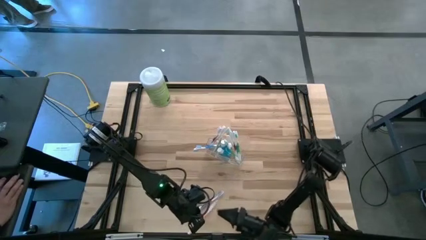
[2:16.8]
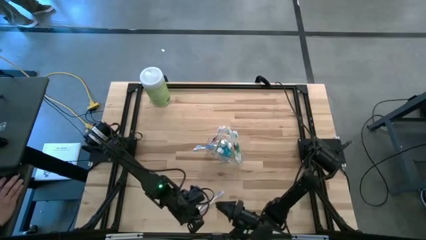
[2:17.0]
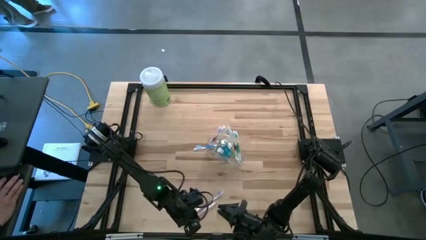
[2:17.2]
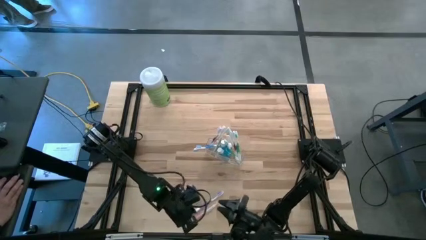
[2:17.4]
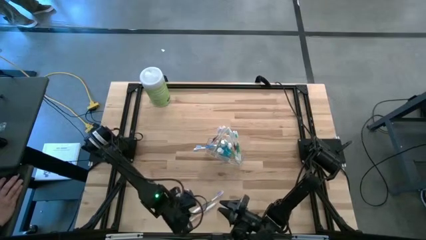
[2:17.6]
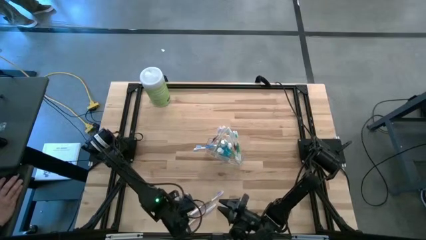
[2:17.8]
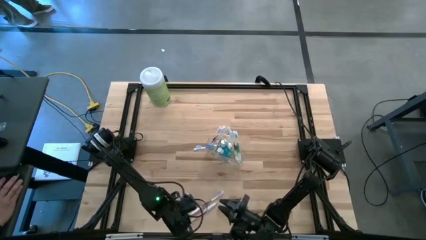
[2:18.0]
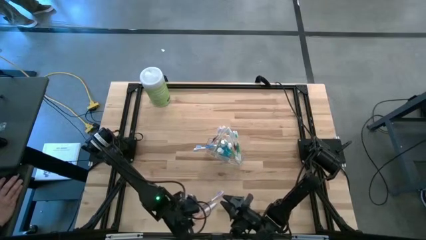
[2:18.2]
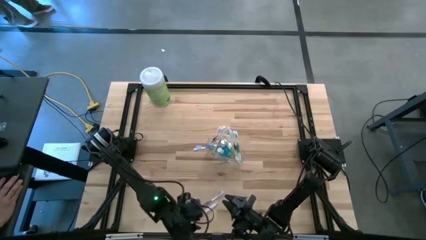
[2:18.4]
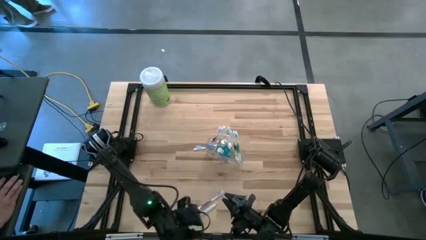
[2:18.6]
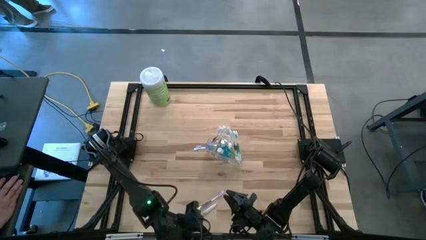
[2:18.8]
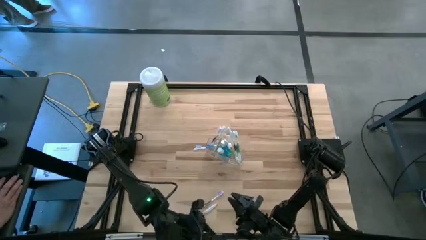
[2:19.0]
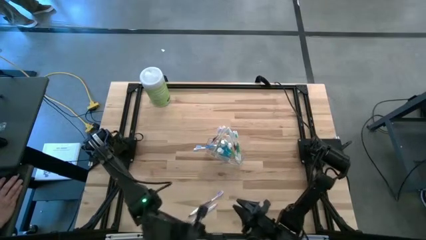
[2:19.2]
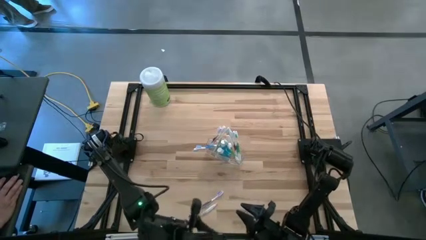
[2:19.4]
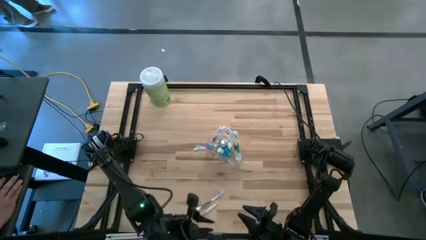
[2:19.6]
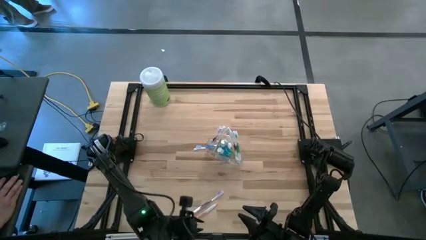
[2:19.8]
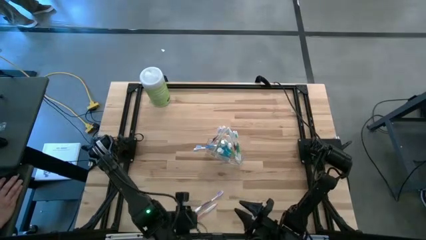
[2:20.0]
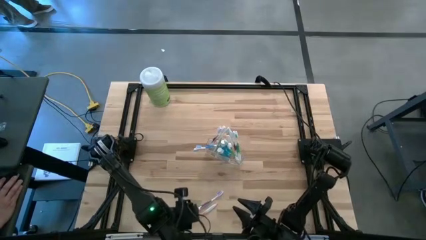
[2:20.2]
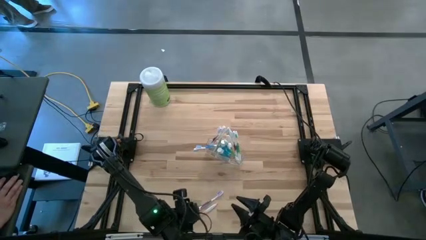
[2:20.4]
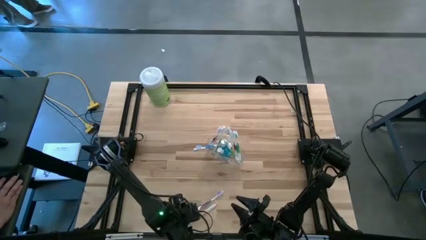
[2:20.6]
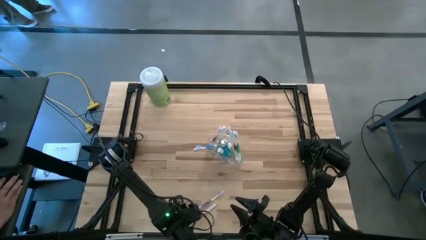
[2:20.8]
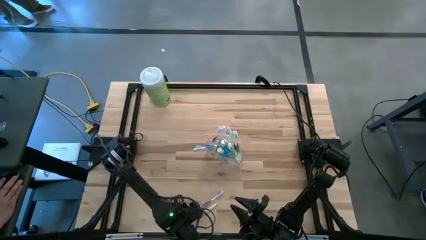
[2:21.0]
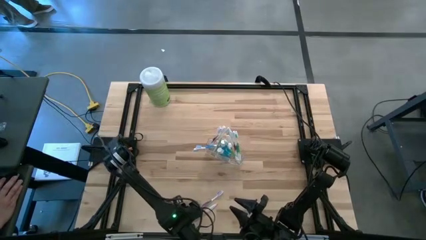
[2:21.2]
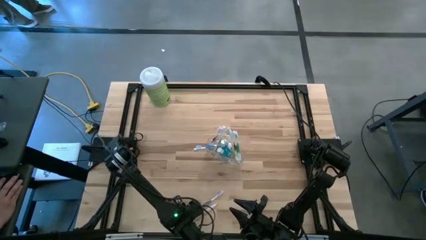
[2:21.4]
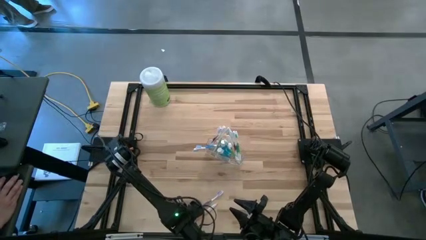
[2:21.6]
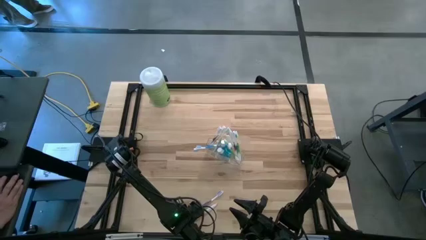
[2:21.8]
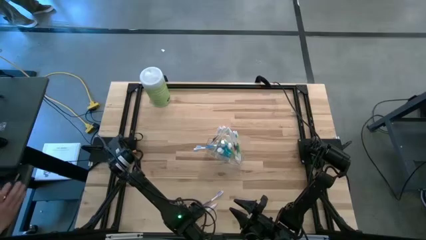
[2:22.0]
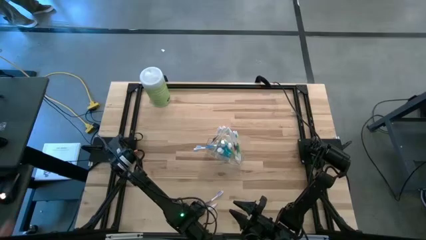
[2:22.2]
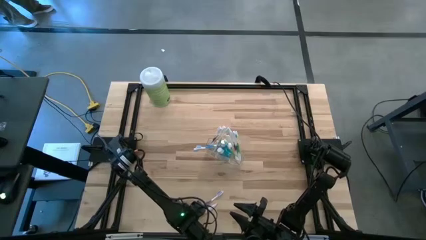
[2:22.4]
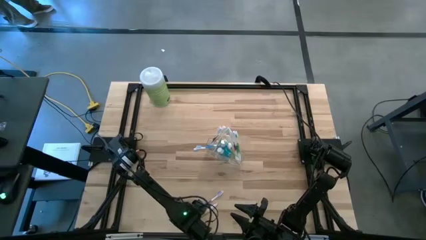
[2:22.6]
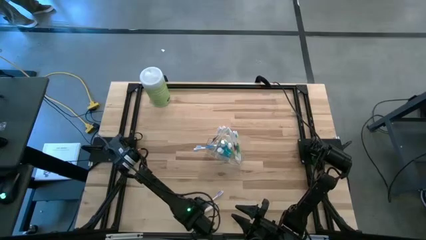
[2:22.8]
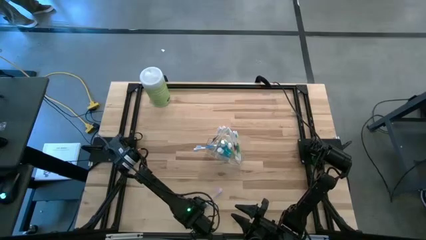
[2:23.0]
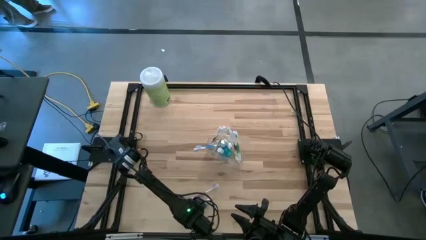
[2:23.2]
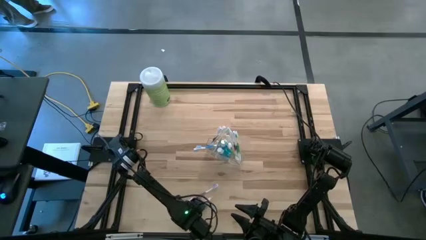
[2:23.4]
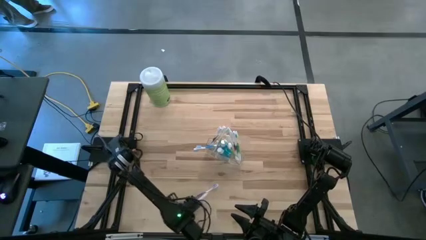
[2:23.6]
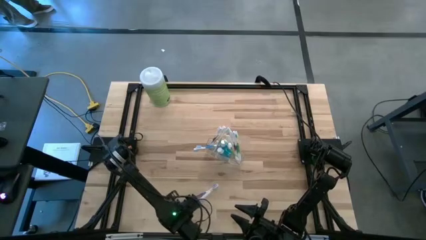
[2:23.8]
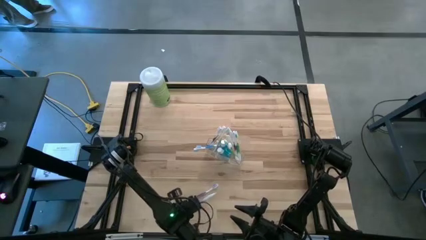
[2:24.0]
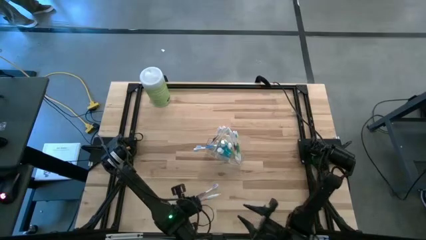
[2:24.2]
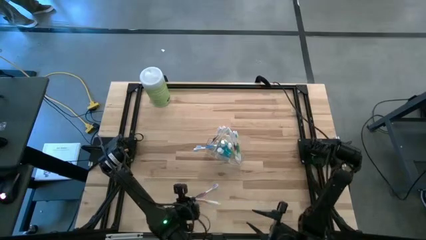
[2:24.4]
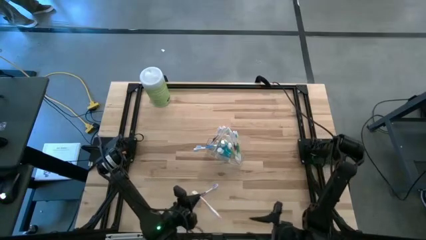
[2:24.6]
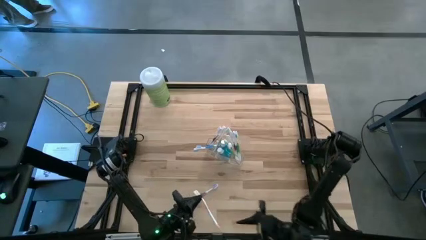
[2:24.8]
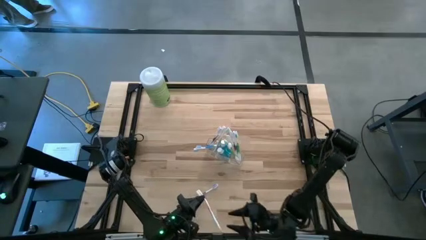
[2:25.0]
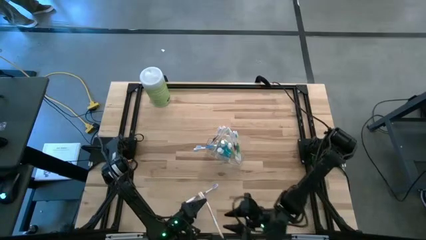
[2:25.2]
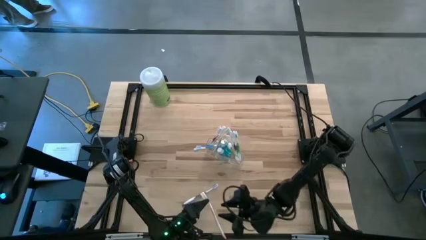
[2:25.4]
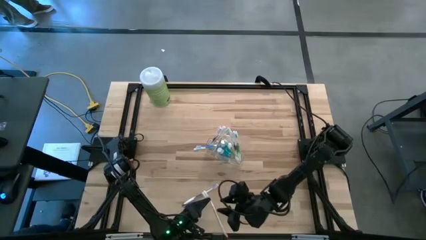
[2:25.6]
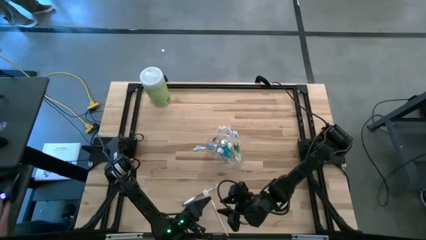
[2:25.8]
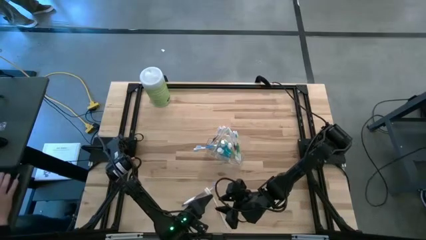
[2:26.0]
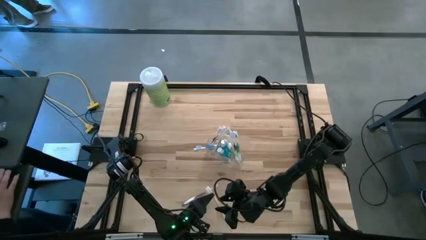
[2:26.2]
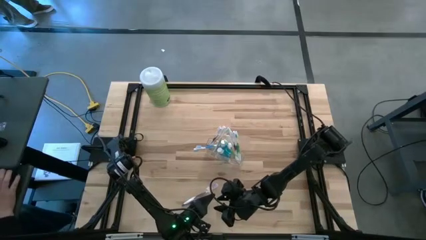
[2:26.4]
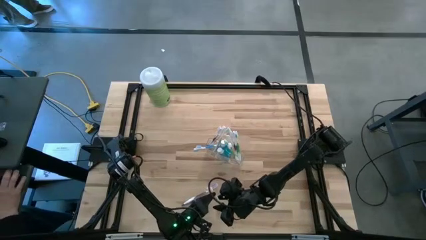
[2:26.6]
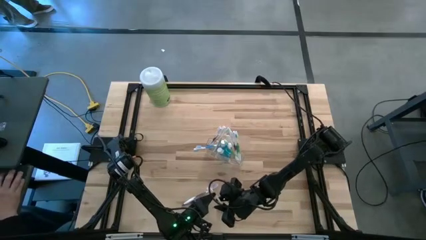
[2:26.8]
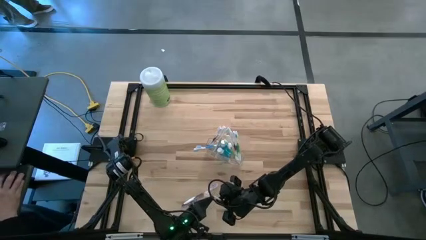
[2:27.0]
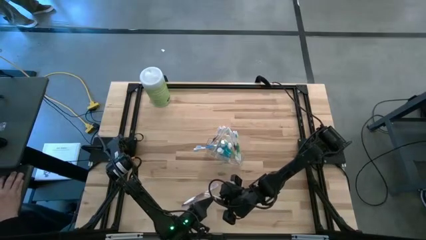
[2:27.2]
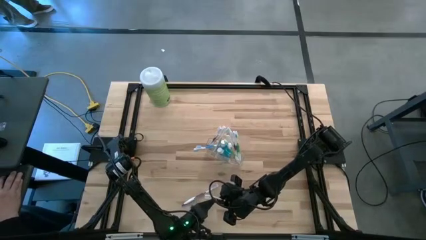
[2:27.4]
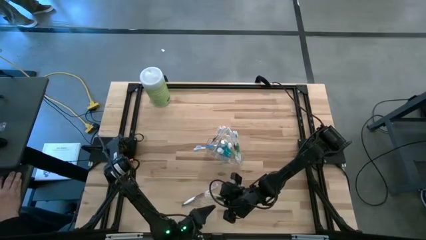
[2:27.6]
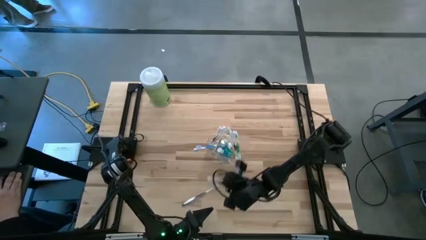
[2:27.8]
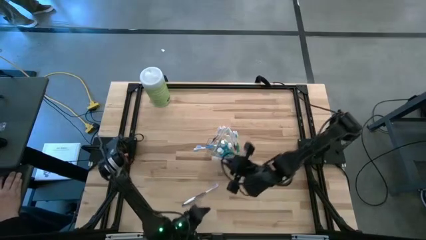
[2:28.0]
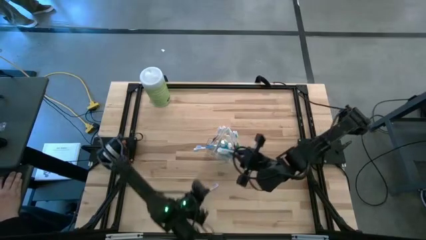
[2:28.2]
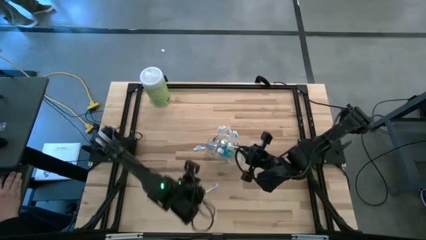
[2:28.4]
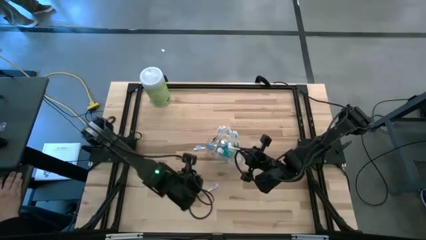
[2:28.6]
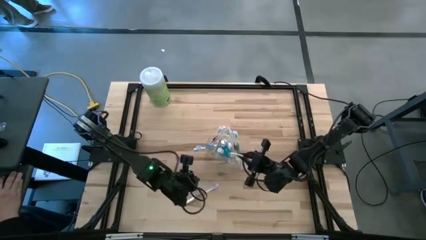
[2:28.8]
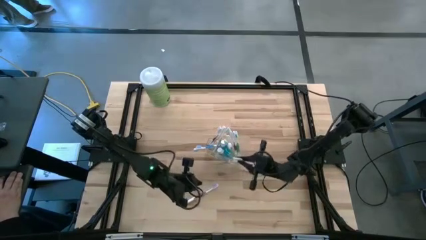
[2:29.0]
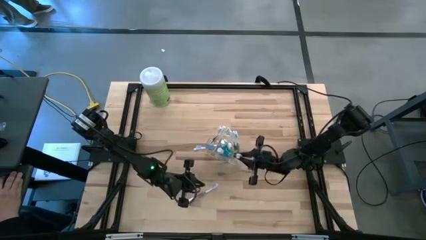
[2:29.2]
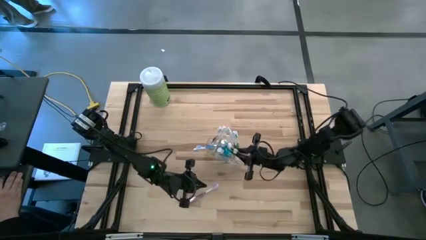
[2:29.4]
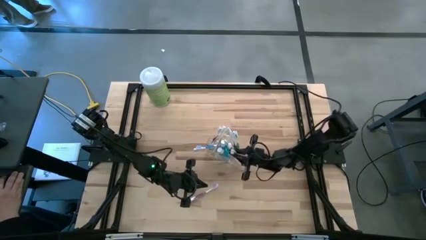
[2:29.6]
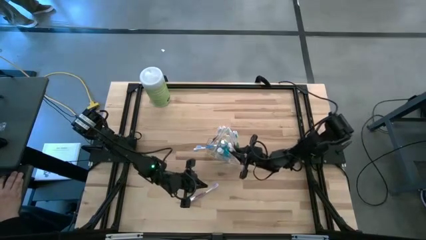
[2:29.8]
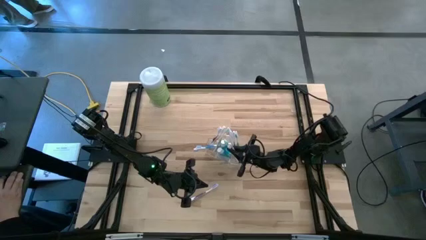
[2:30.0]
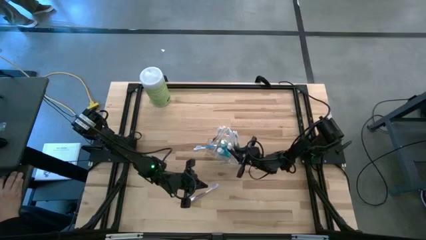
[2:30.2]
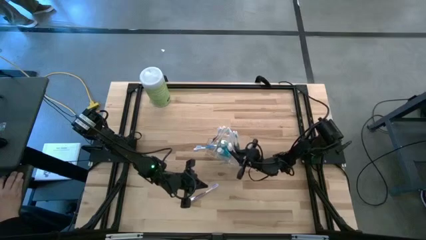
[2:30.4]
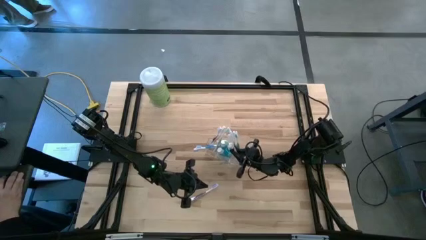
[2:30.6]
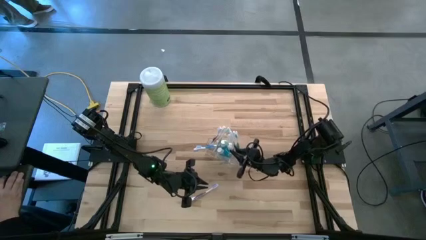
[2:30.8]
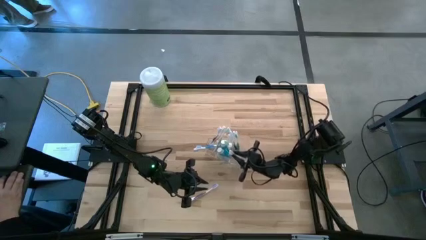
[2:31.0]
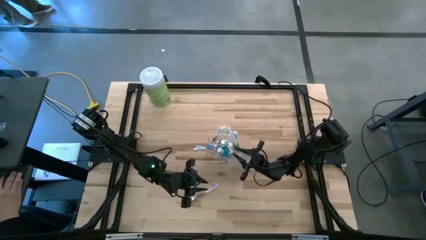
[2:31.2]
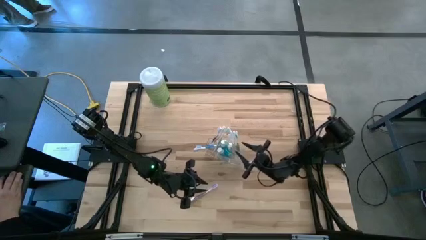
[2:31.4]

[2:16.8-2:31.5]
Task: Pick & Place toothbrushing station
Put the orange toothbrush into the transparent organizer
